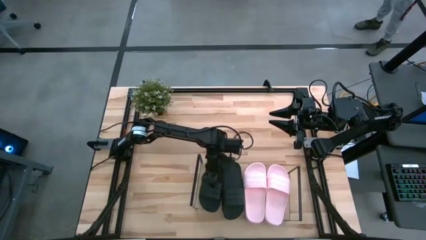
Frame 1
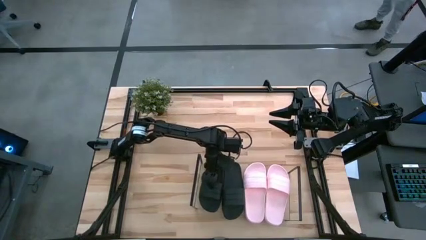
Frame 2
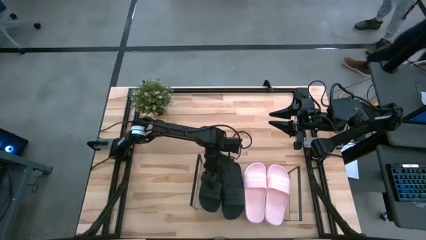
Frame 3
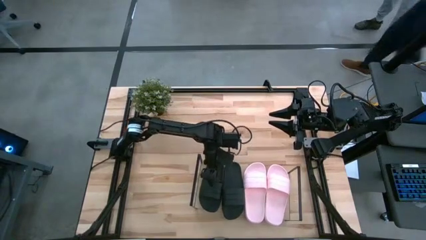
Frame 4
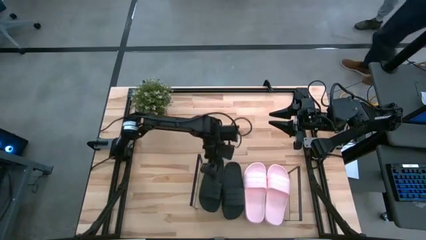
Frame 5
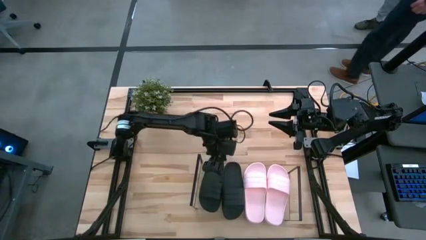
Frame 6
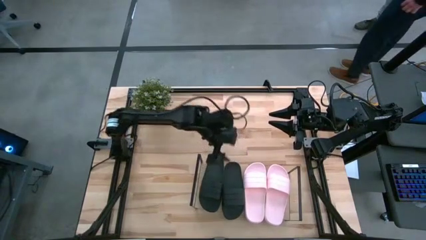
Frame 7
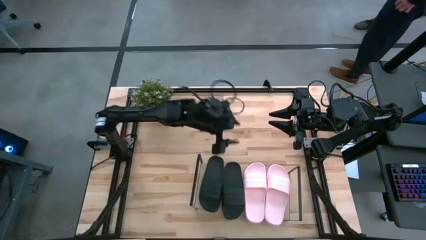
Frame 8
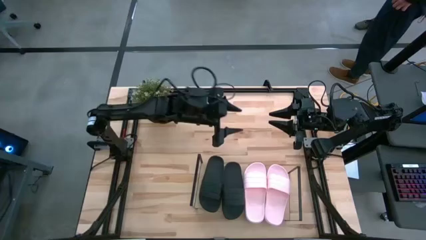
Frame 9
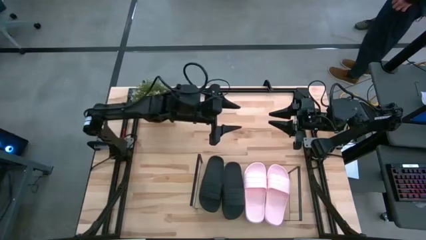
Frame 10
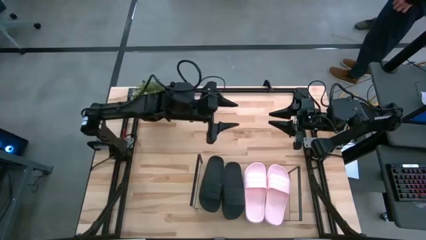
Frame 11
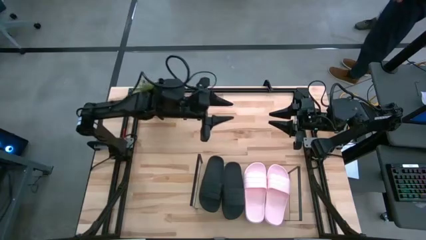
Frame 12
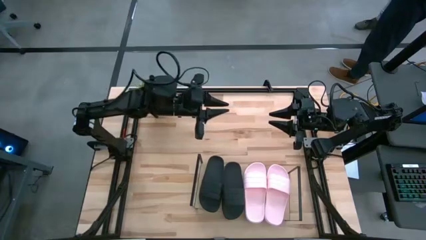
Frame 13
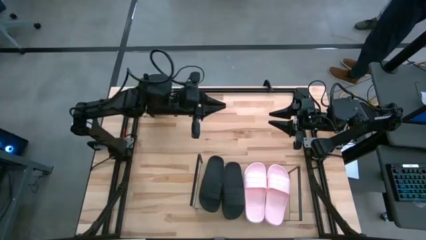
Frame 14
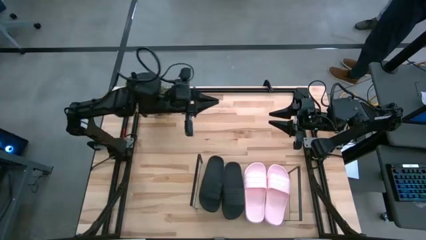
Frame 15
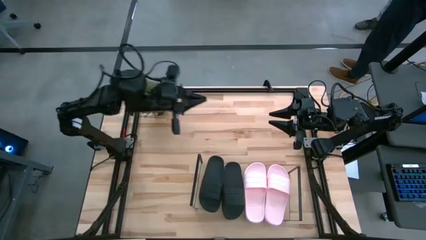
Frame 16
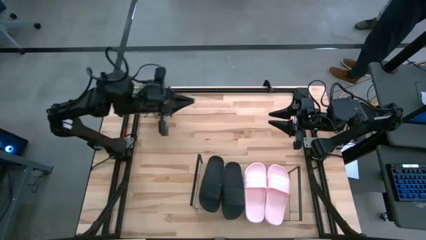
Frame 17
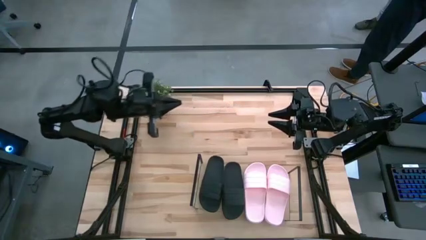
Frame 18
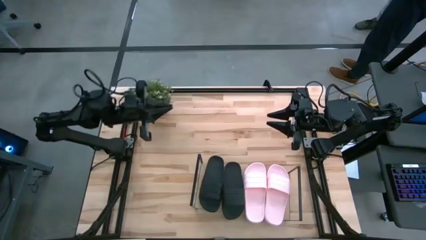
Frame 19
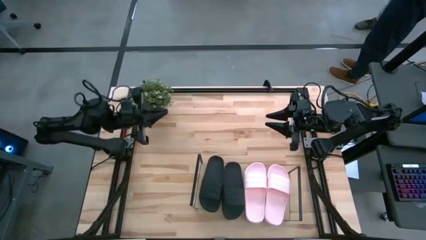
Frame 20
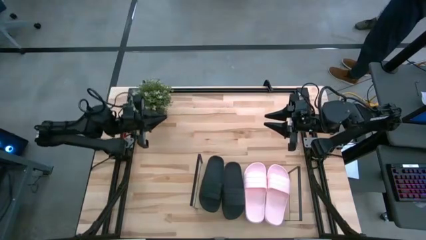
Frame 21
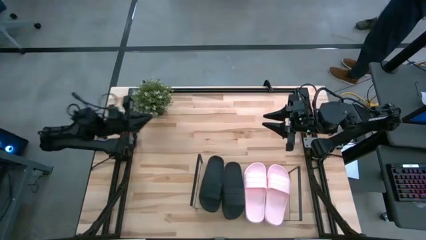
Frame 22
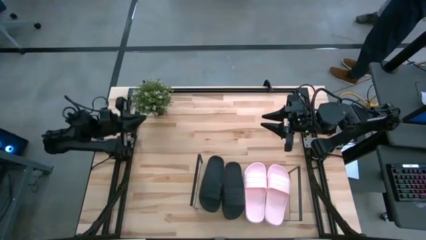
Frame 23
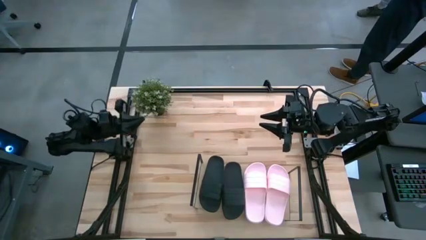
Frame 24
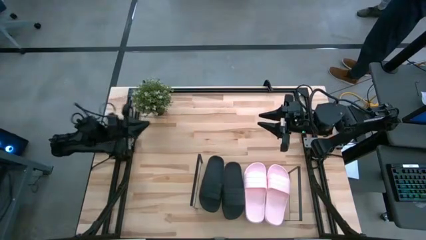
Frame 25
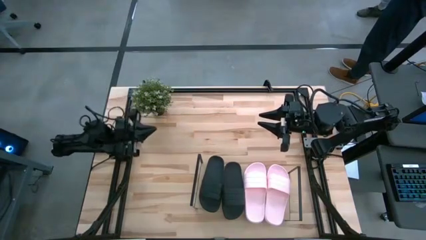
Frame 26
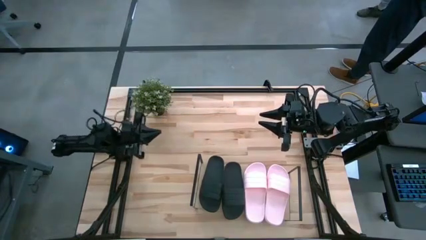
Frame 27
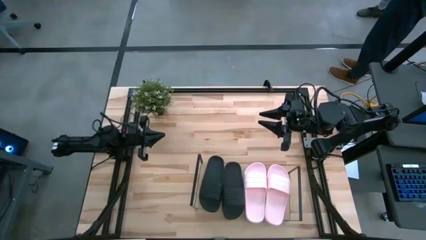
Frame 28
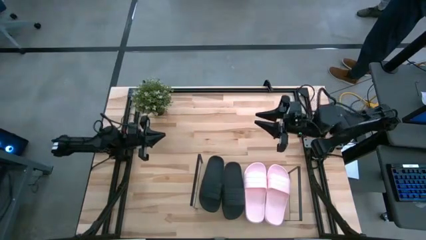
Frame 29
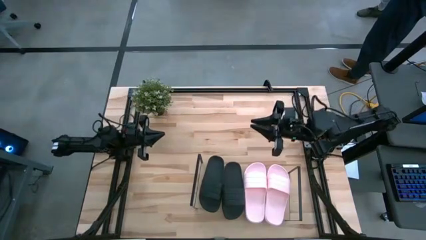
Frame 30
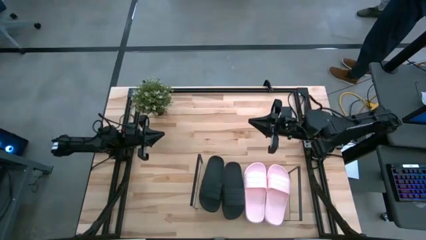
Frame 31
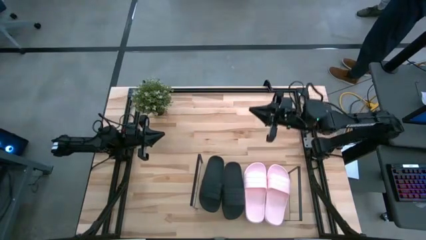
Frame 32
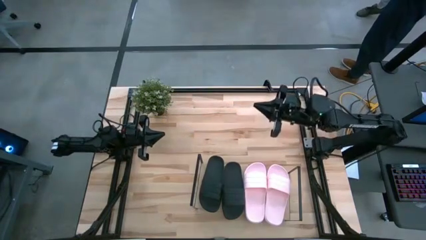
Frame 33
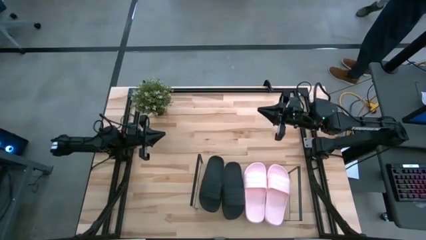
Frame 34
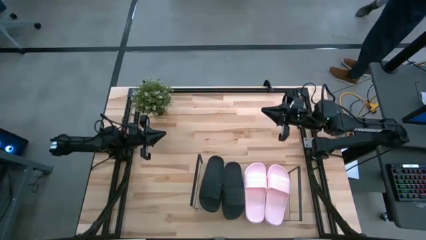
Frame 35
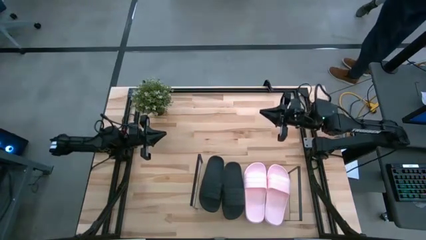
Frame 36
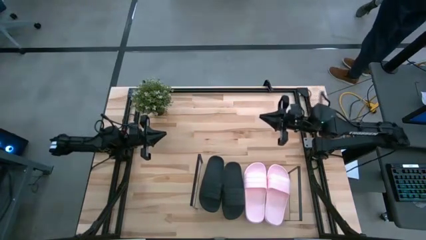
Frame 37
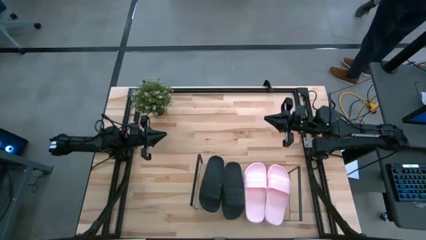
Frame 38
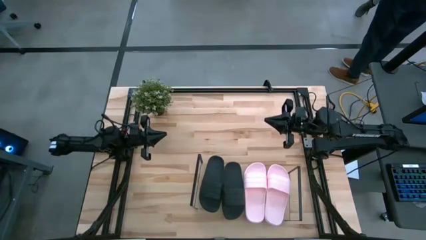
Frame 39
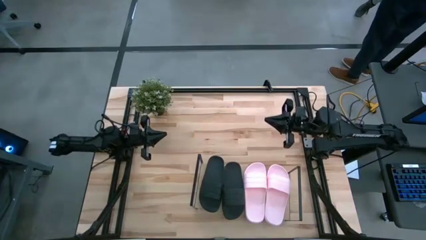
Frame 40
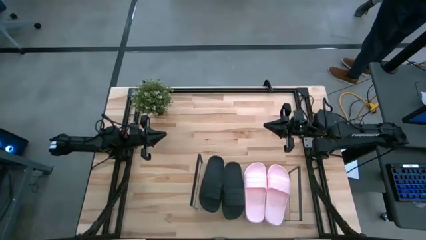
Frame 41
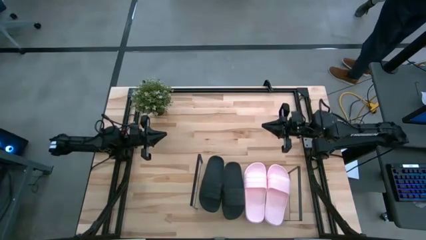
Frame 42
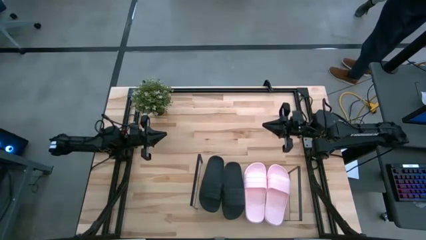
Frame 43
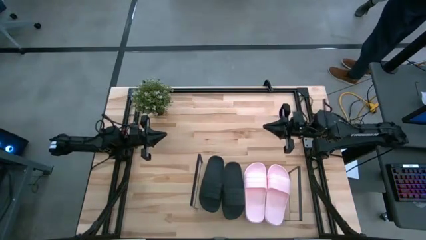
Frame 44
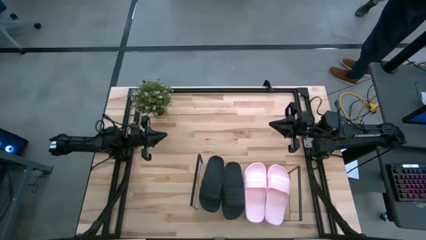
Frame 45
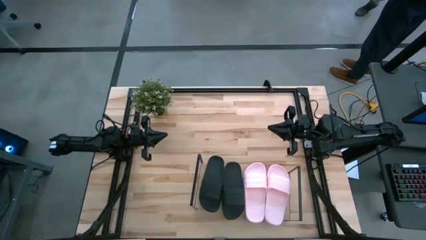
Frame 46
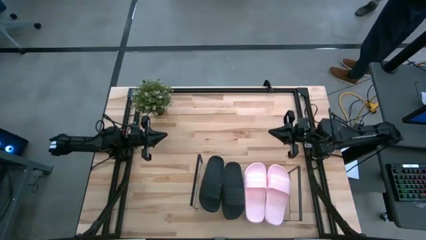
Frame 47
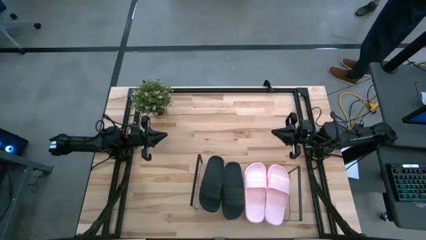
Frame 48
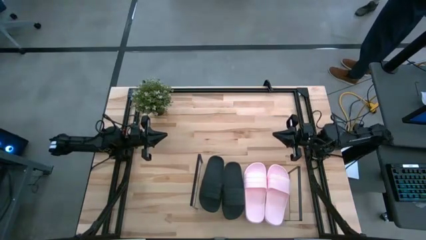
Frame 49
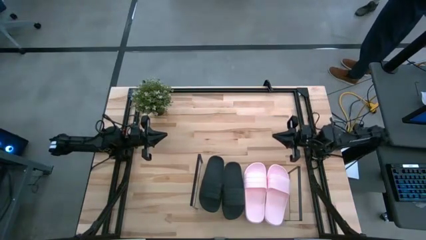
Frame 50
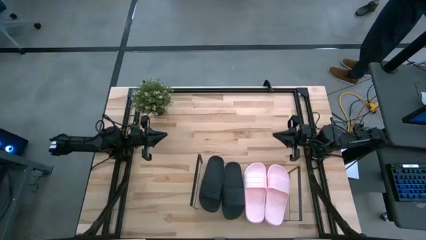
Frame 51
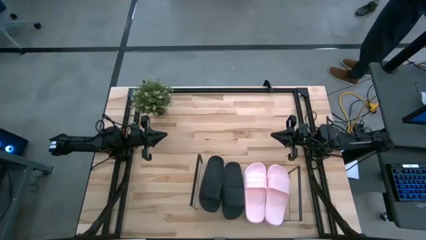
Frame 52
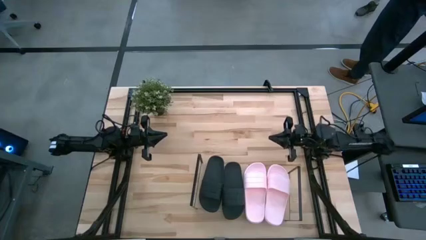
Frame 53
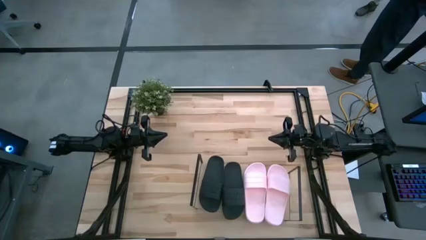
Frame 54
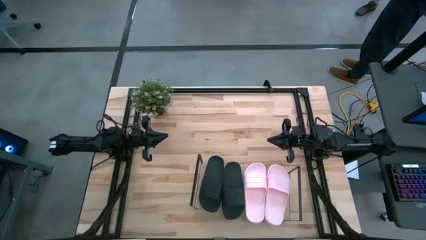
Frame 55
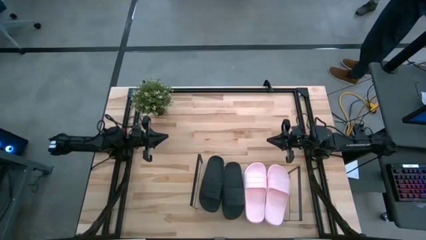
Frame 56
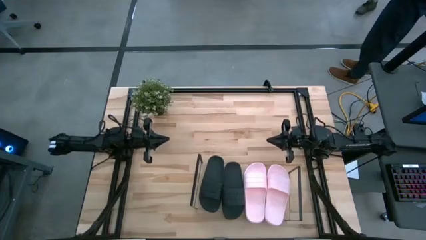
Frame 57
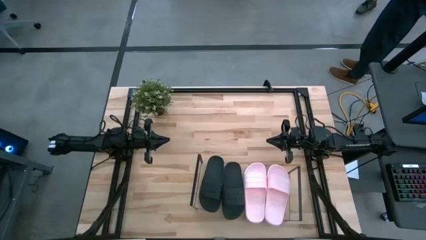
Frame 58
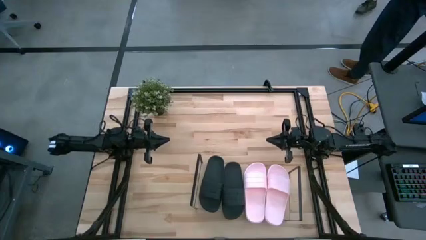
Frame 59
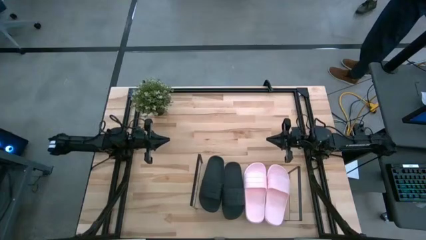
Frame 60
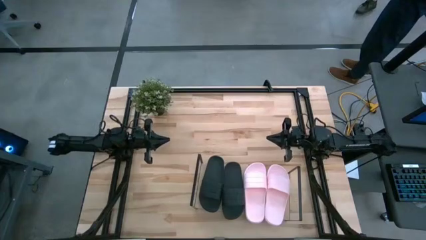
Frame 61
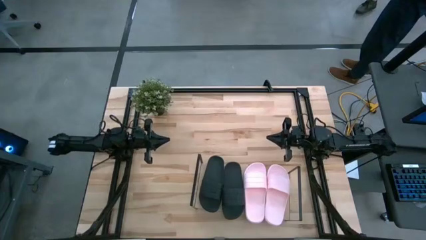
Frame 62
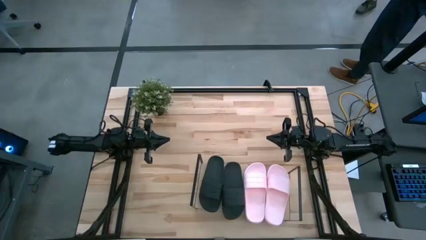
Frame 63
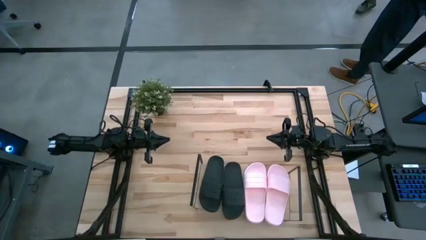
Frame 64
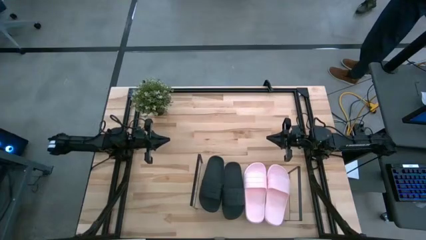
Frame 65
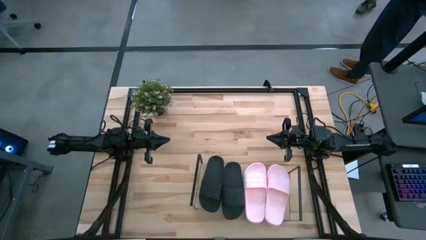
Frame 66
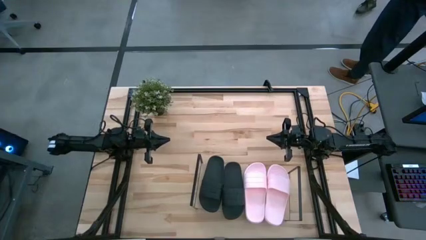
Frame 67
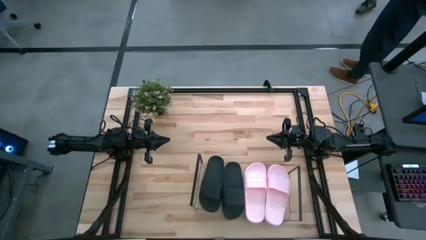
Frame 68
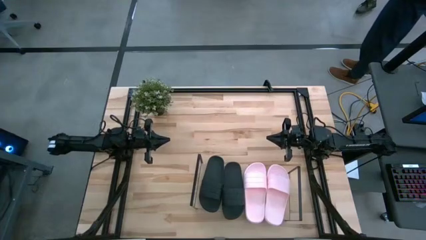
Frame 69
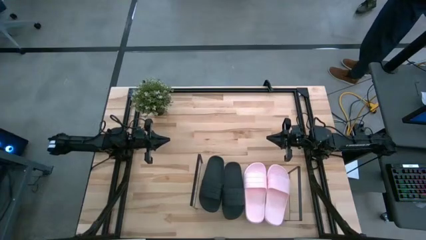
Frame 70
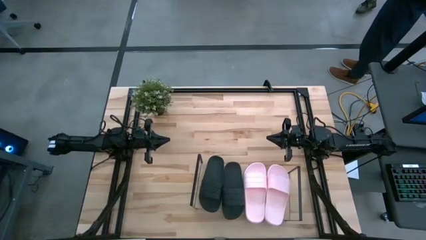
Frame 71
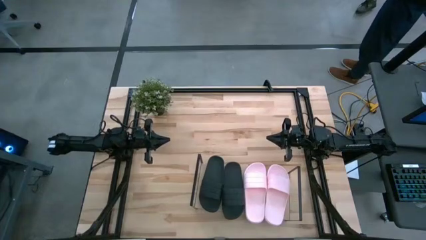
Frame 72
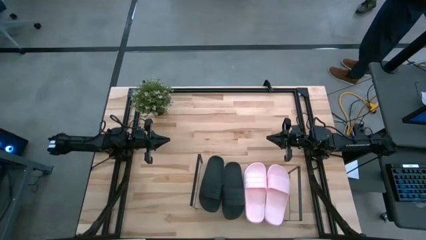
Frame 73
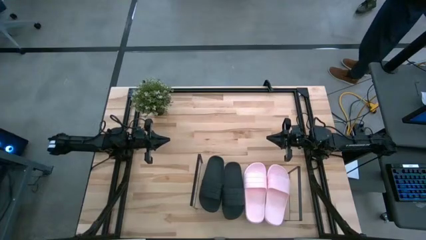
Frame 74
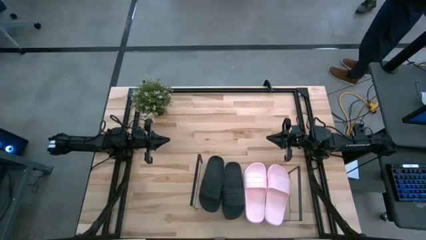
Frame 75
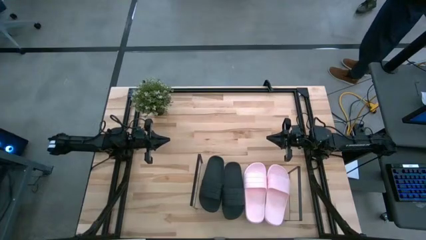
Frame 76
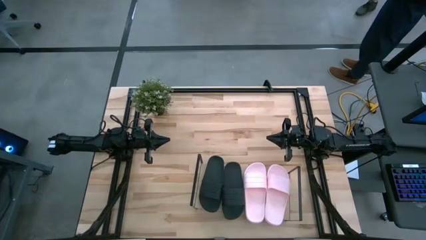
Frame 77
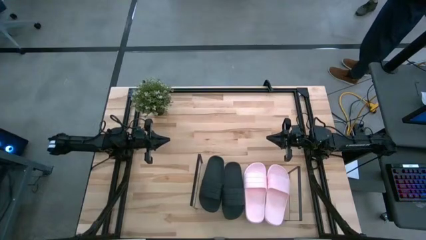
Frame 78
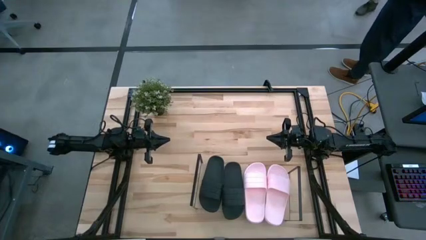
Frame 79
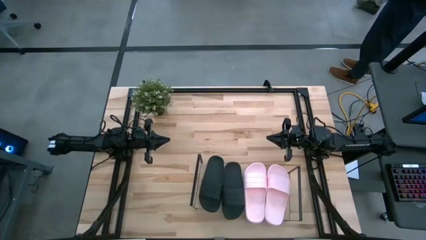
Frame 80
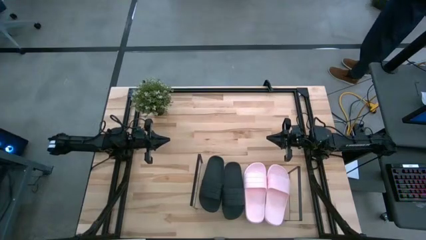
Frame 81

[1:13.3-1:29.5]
Task: Pick and place slides into the shelf
Return to Home Position
